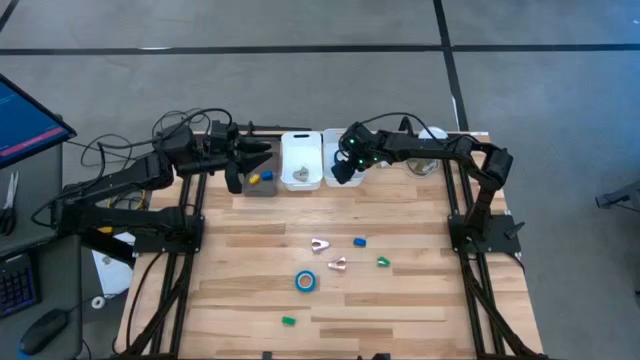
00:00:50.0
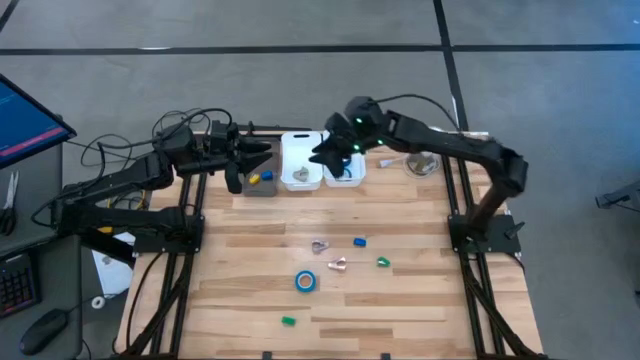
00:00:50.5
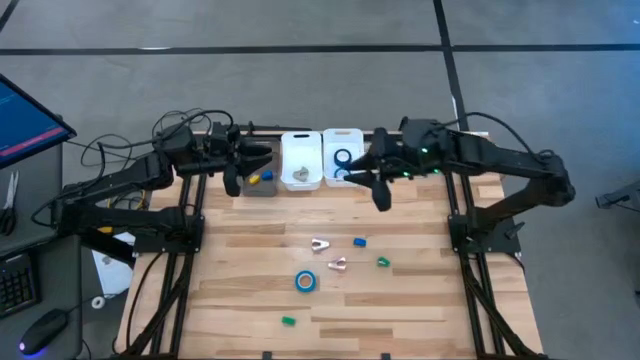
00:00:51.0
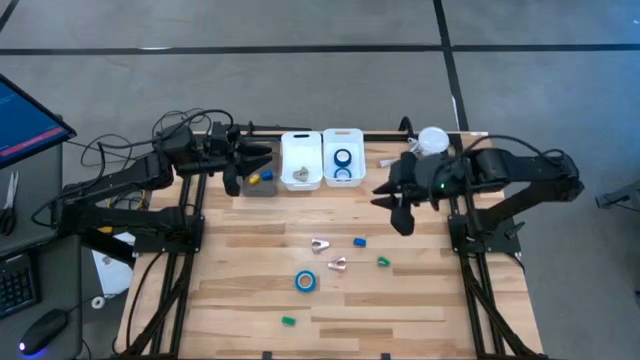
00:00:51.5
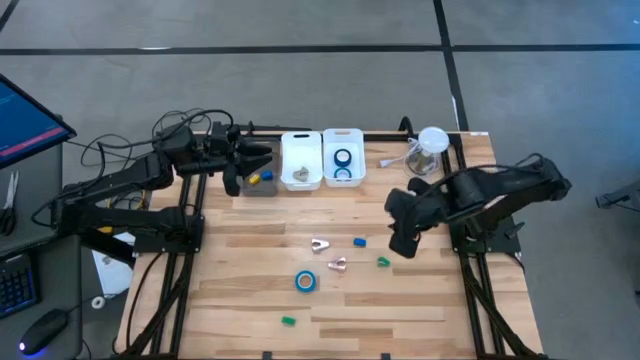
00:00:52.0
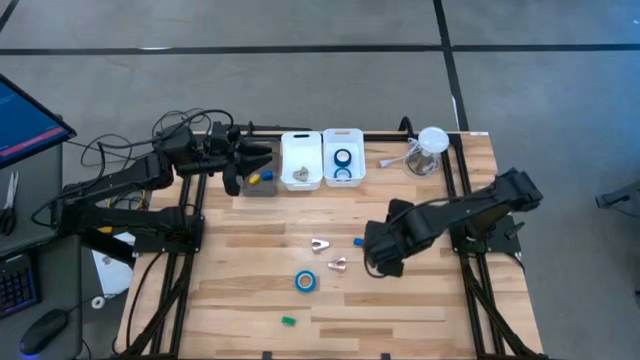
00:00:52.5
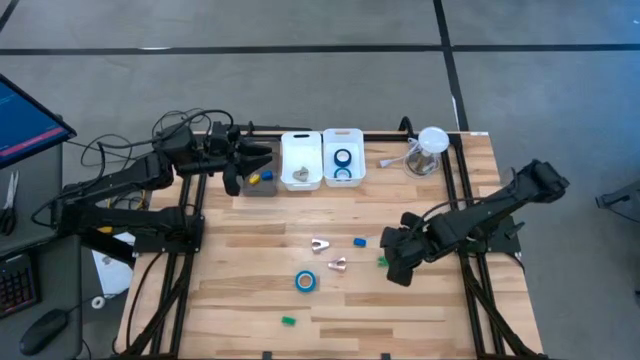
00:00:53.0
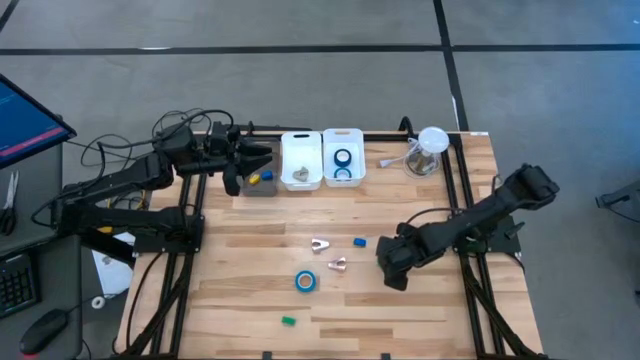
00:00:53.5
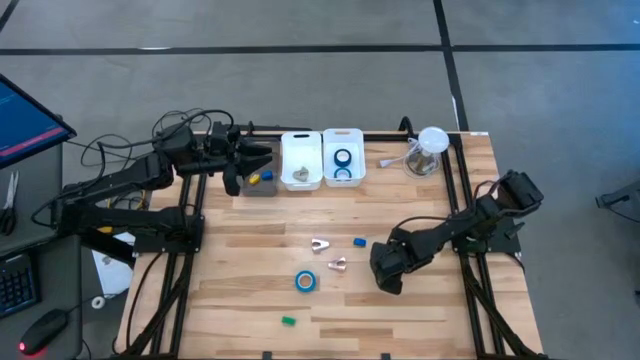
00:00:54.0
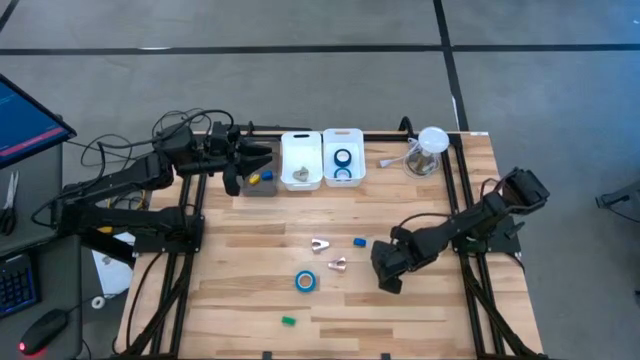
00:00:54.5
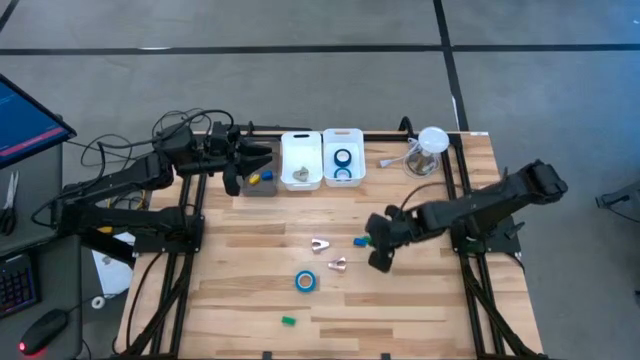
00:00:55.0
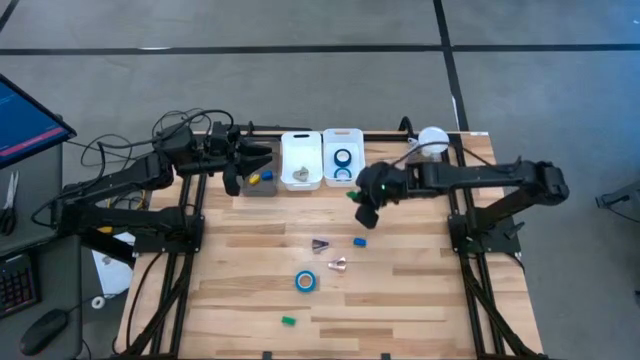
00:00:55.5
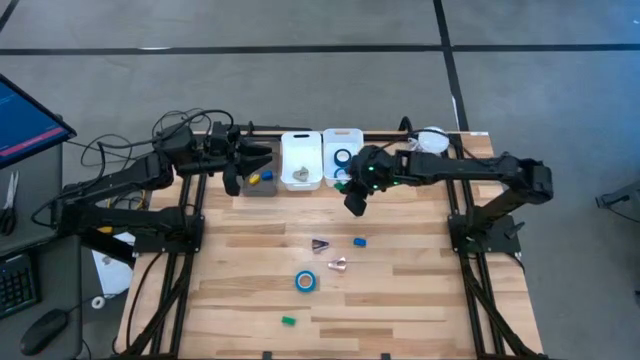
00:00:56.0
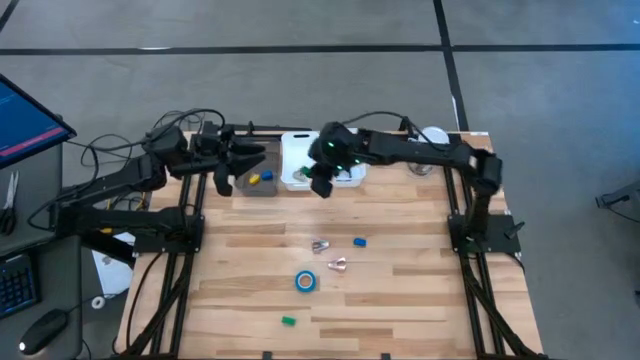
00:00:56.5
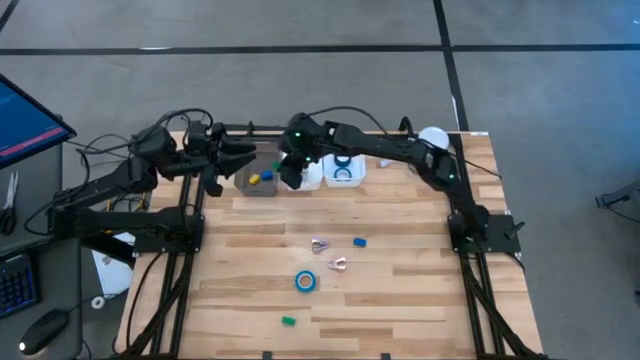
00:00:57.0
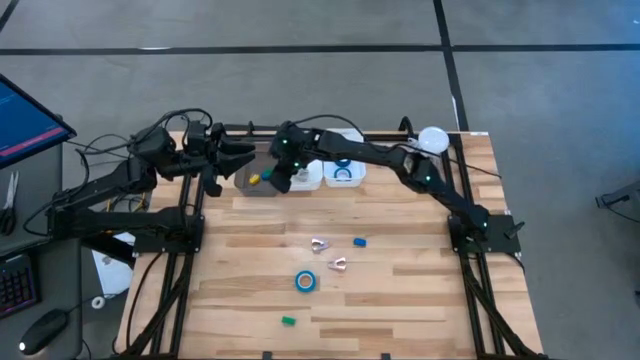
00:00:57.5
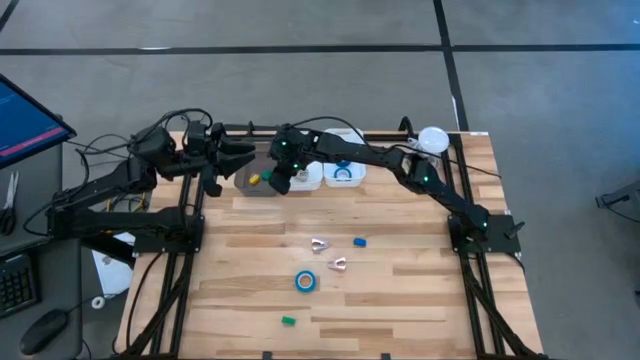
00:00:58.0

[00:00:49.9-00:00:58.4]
Task: Pick and place Stapler, Stapler remover, tape
Put the top green stapler into the black bin

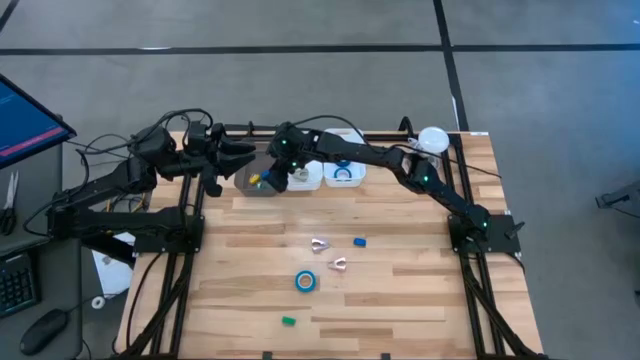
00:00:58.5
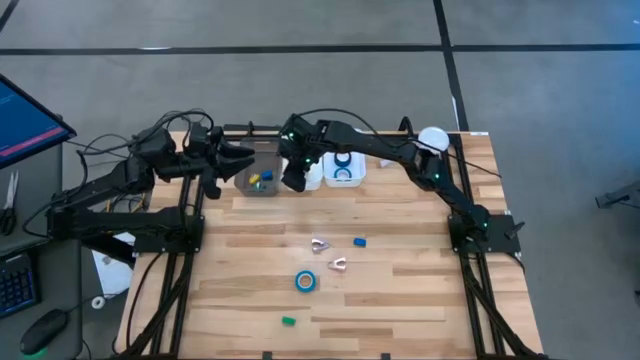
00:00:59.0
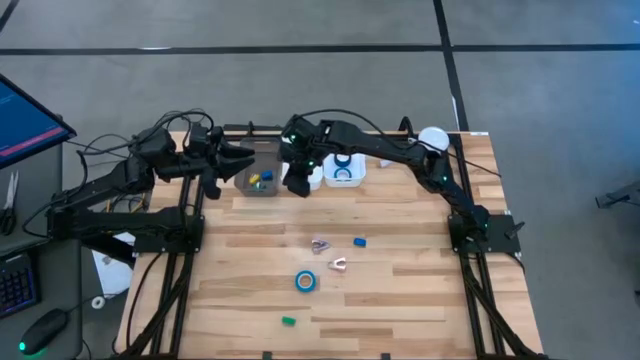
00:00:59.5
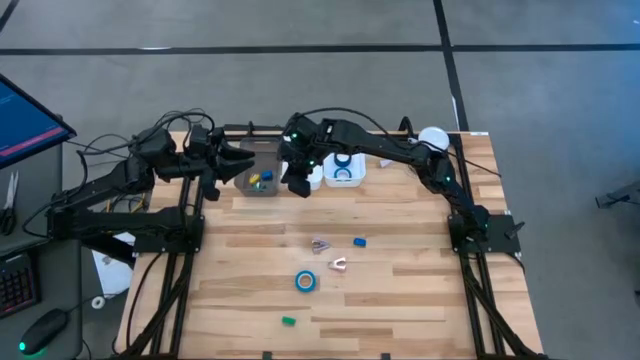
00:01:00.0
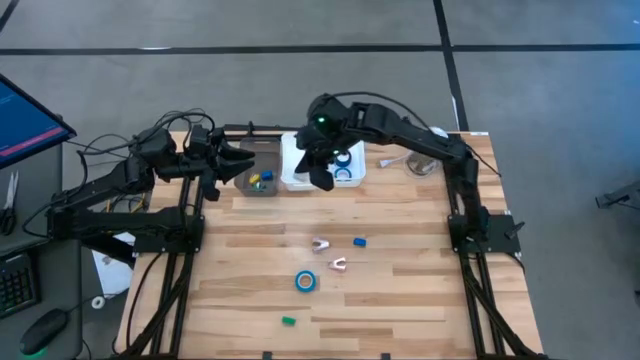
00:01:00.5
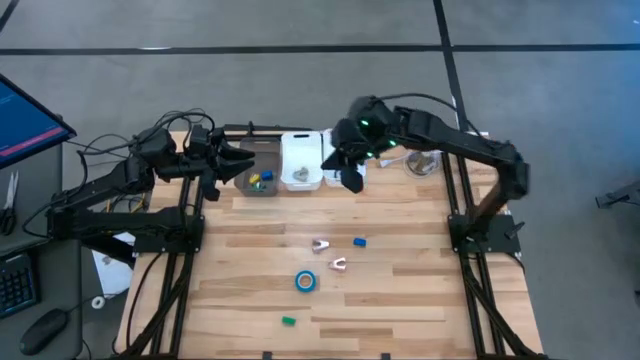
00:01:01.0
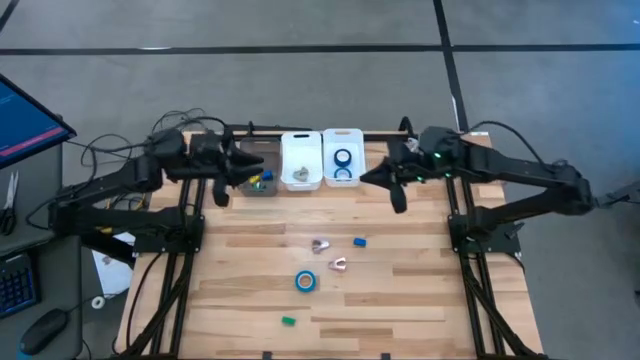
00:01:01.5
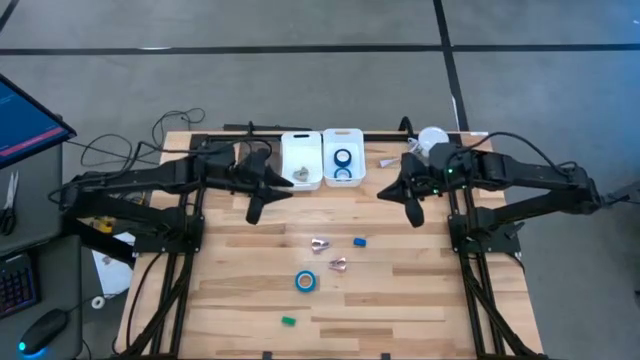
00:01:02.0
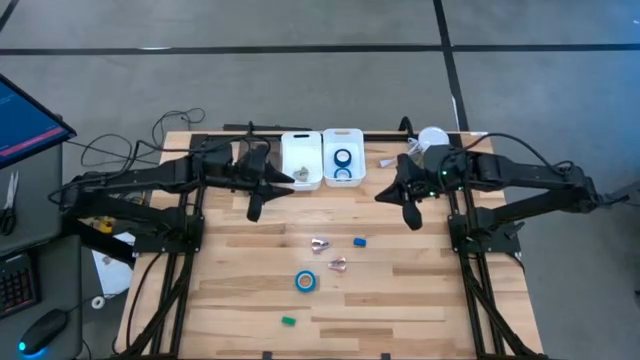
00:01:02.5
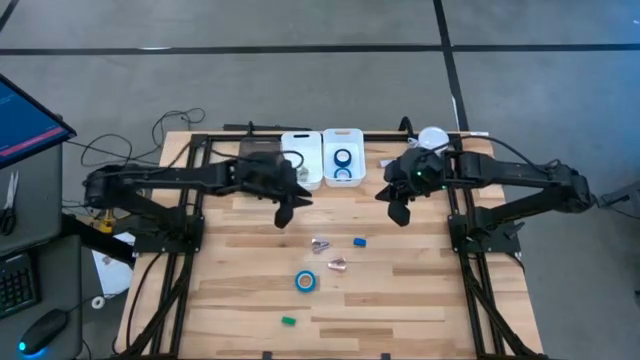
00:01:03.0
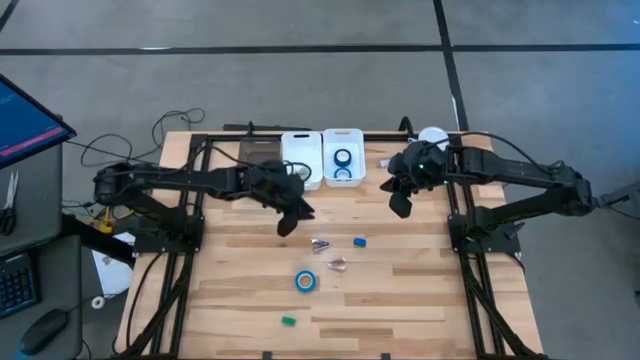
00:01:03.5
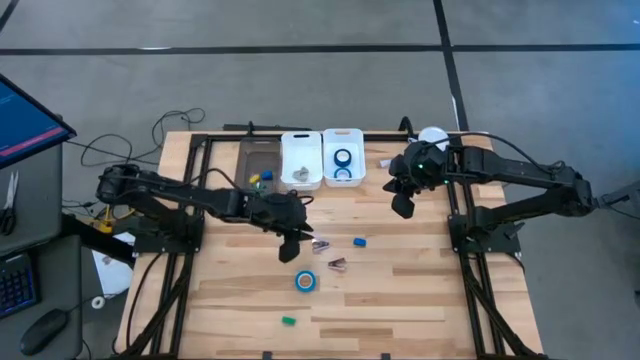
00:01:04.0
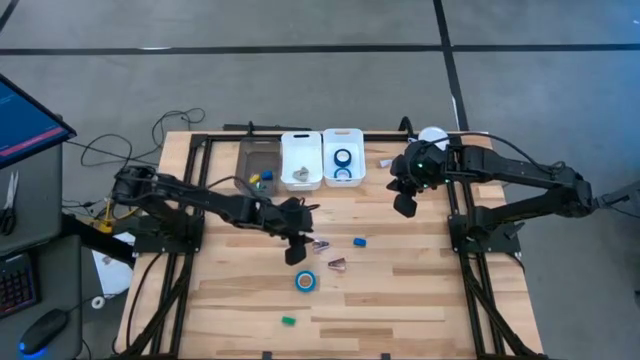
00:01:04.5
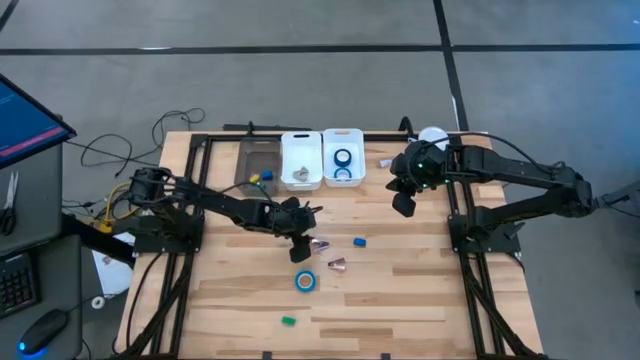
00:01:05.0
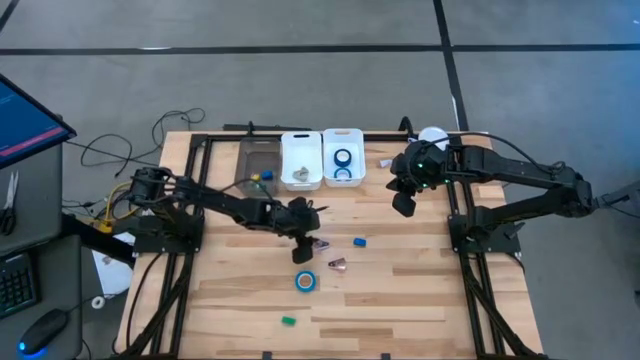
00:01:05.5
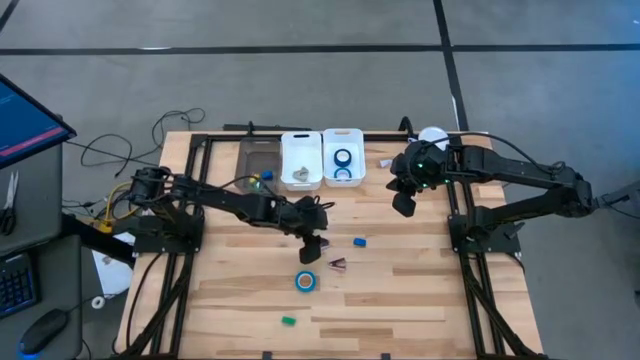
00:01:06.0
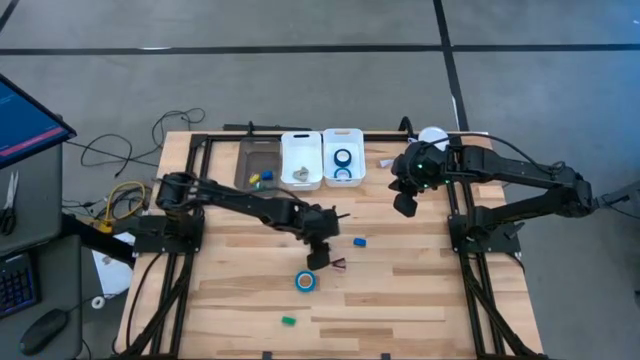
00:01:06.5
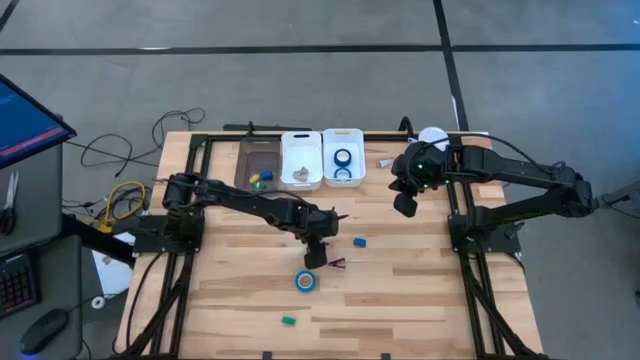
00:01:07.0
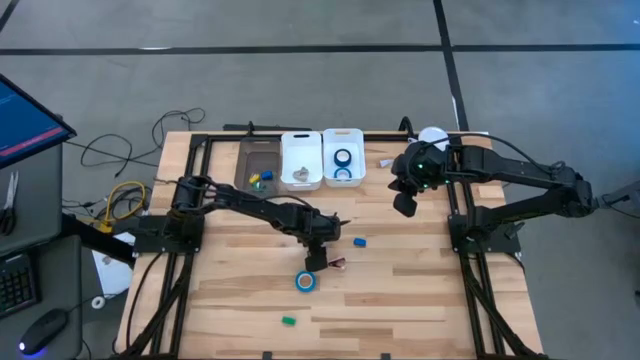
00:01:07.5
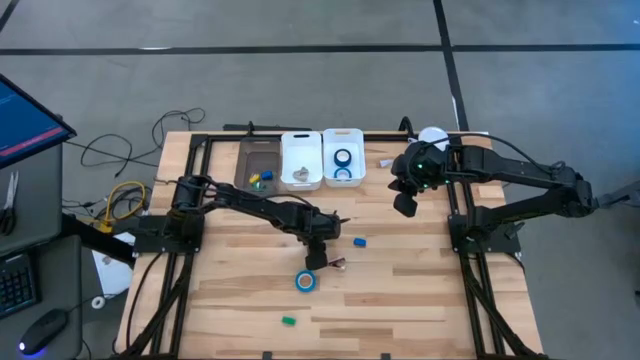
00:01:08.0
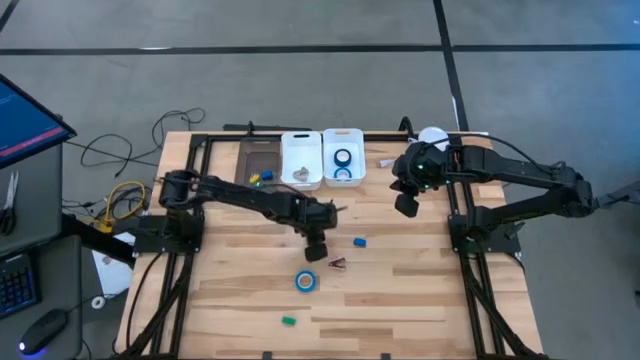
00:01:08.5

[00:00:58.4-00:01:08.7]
Put the violet staple remover into the left white bin

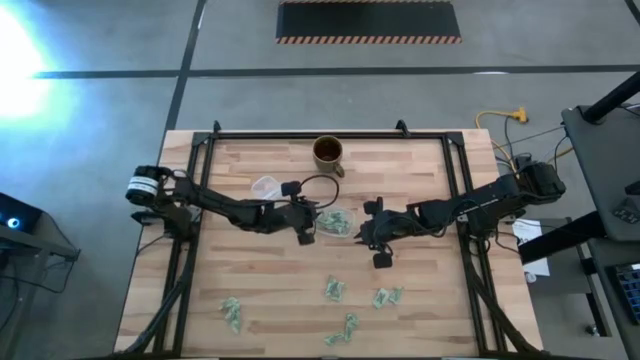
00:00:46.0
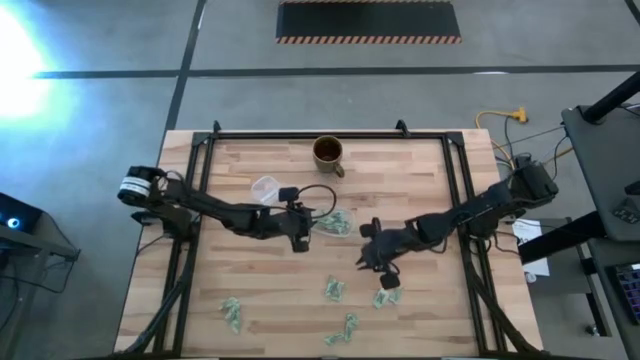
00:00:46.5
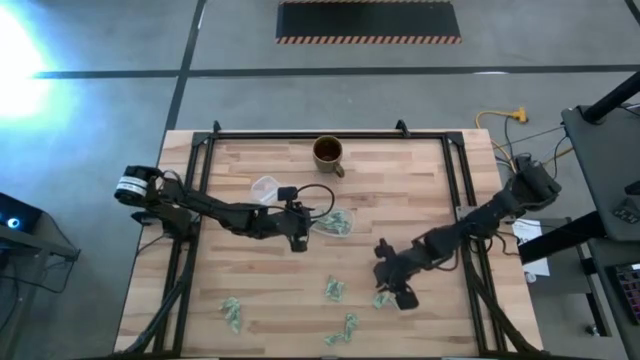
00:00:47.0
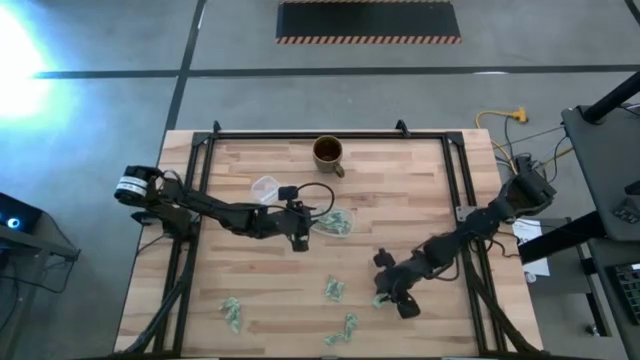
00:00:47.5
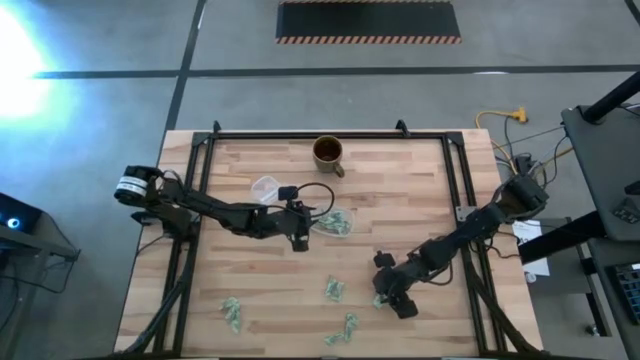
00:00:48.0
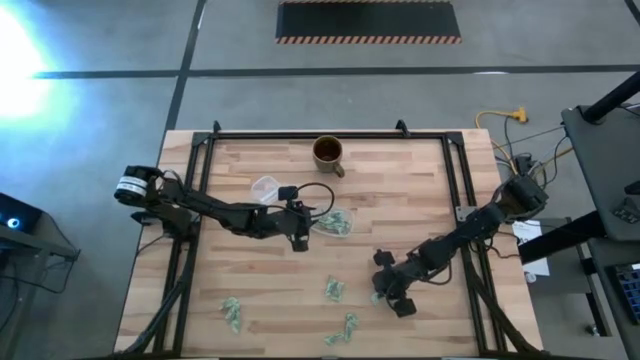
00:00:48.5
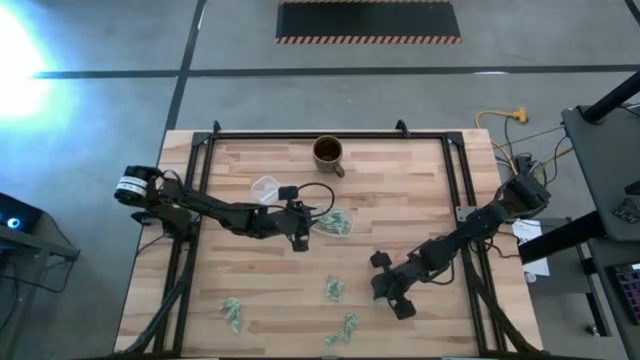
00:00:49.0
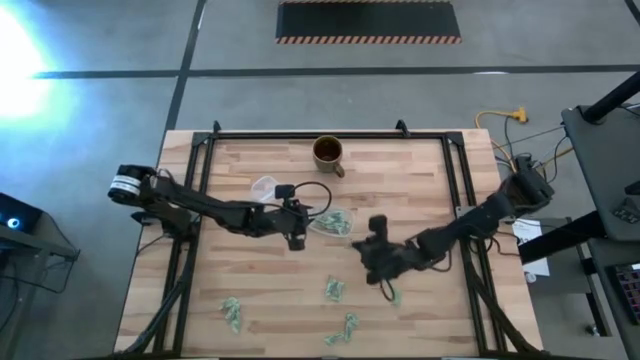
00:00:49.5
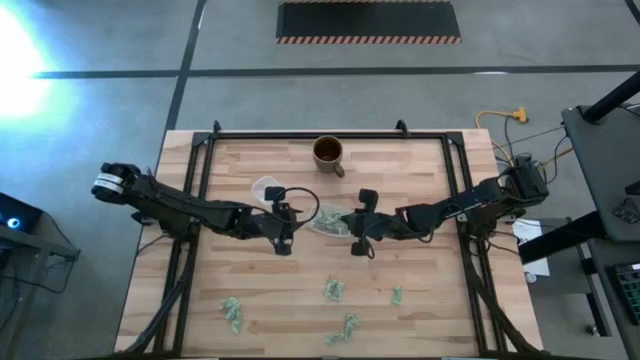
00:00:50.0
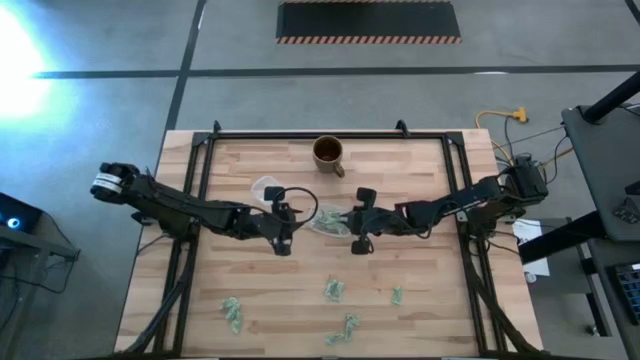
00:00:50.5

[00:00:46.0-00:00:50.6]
Task: Pick and place Stevia / Truvia into bins
Put the green stevia packet into the transparent container
